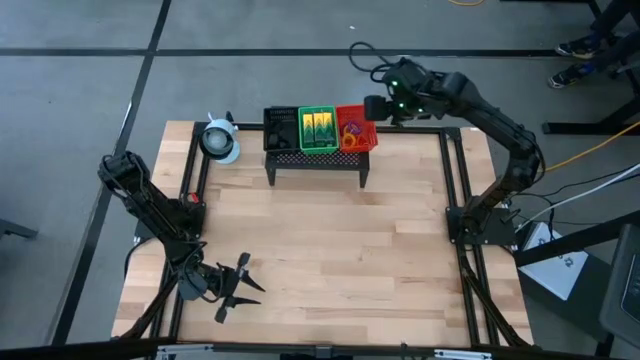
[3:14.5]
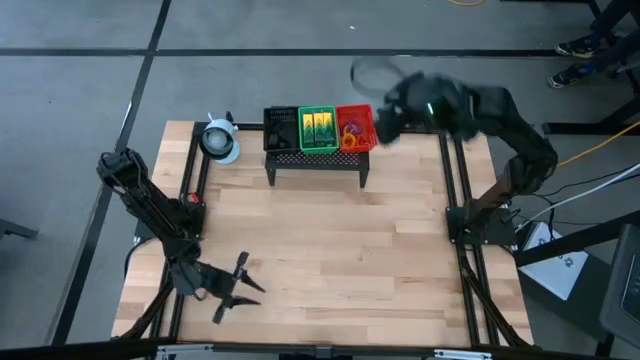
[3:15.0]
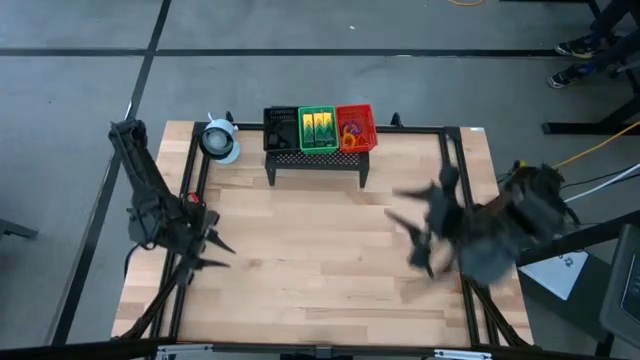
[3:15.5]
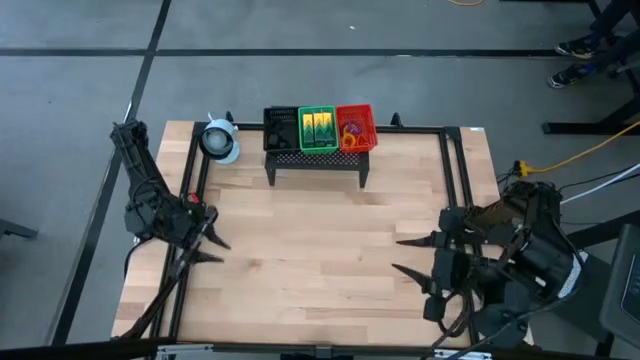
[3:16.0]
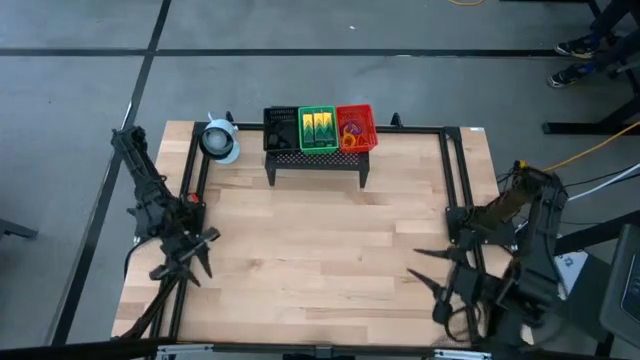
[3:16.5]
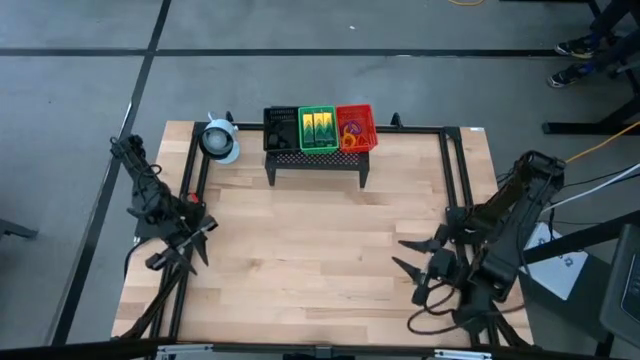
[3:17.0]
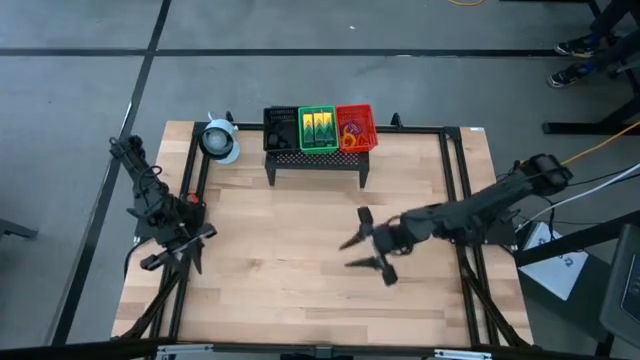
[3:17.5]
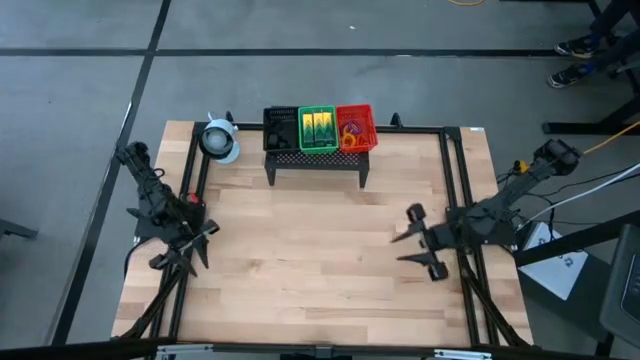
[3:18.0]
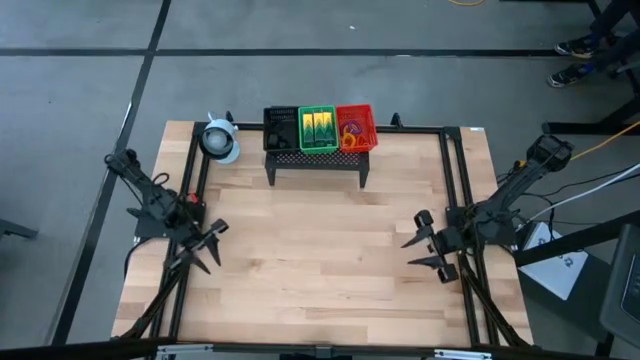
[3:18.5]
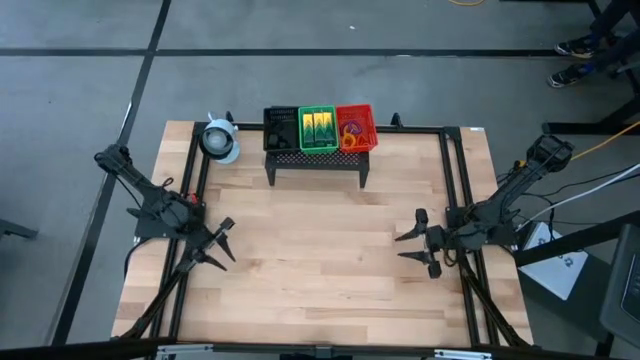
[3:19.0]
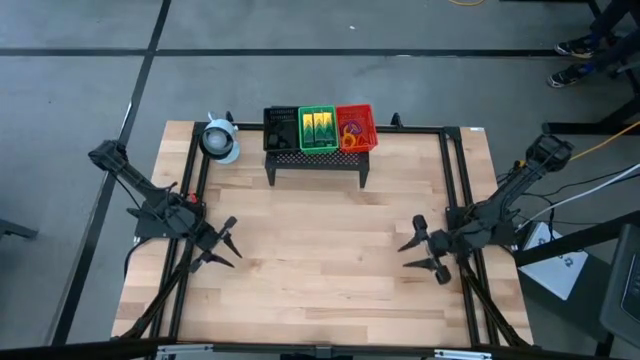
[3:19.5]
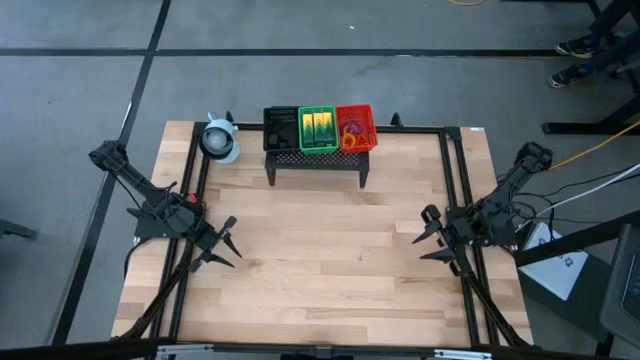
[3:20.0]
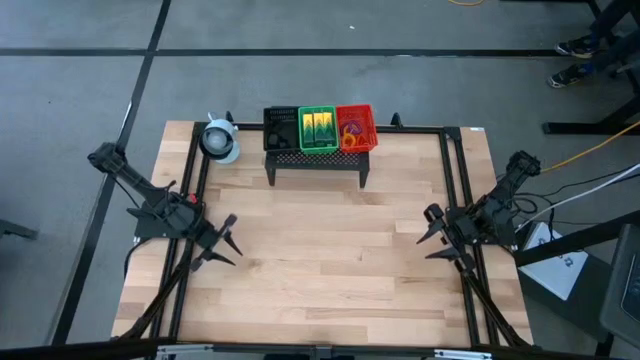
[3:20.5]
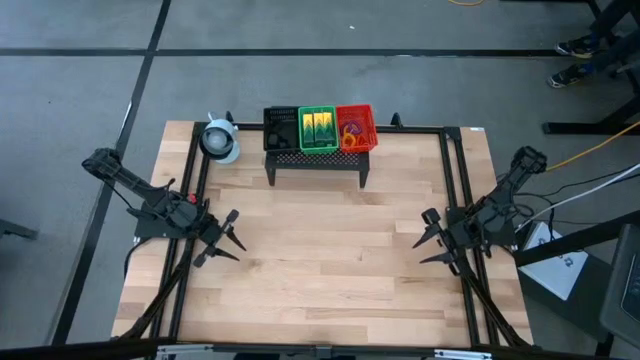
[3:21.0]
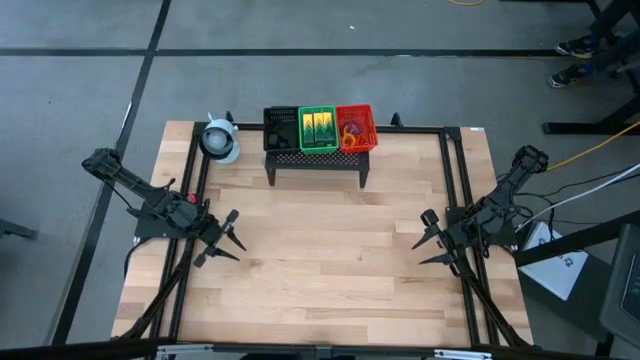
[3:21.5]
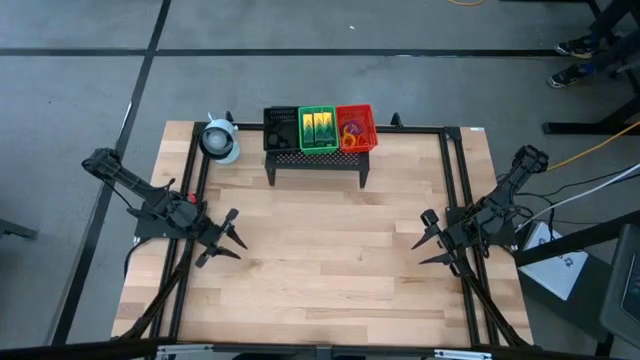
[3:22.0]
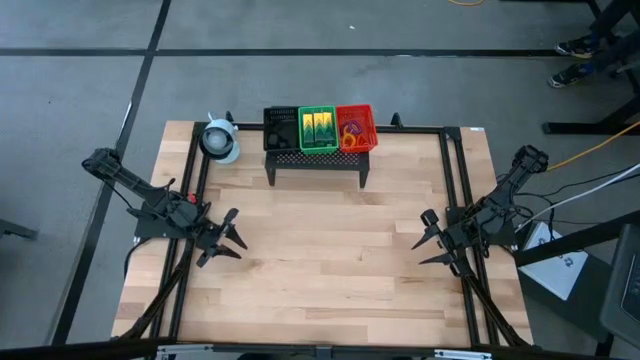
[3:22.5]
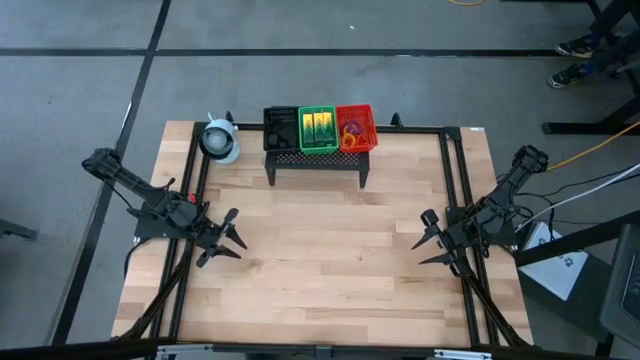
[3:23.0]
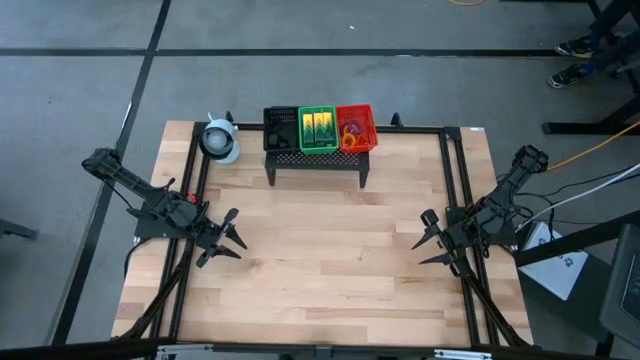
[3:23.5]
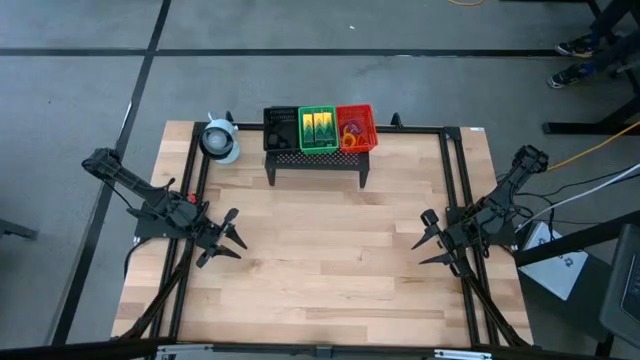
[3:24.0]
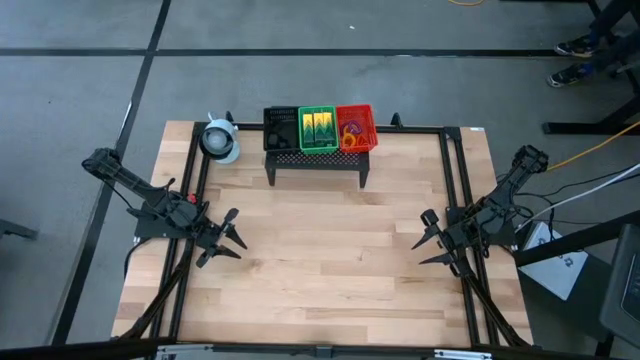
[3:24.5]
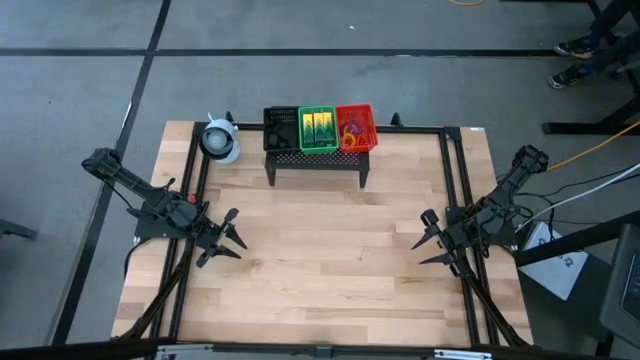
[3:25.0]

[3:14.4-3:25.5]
Task: Pick & Place Office Desk Supplies
Return to Home Position

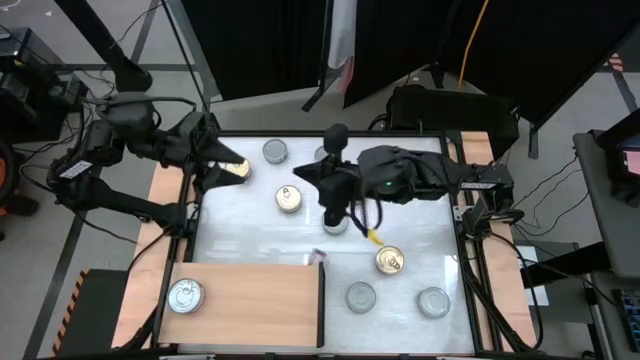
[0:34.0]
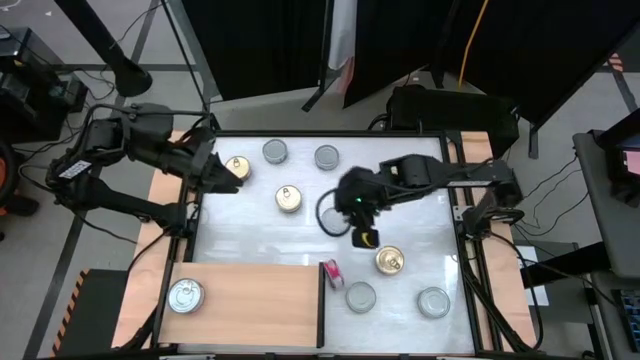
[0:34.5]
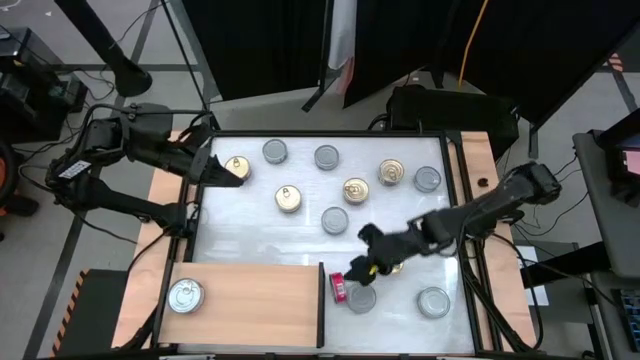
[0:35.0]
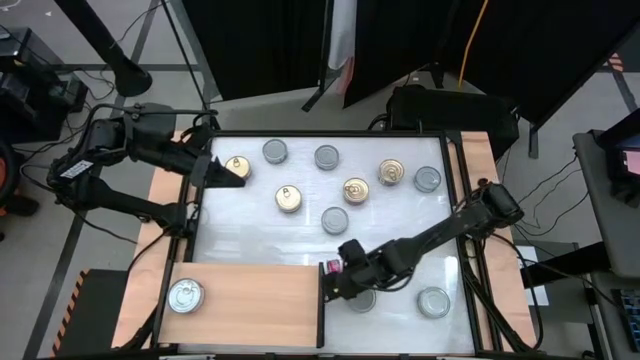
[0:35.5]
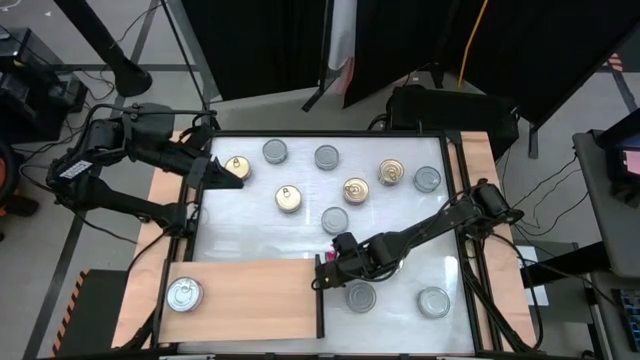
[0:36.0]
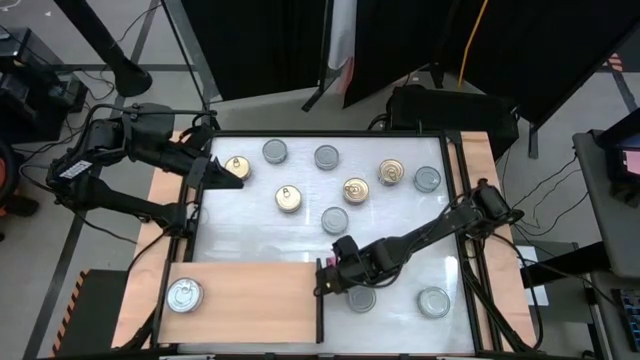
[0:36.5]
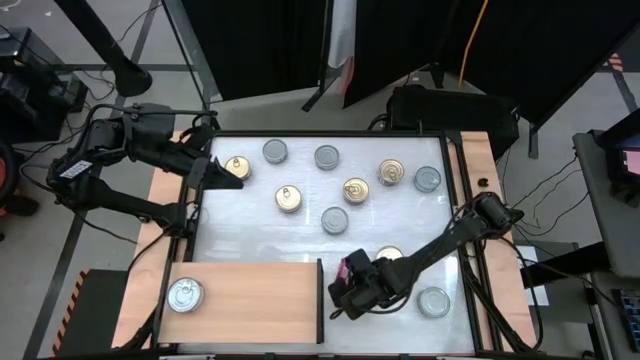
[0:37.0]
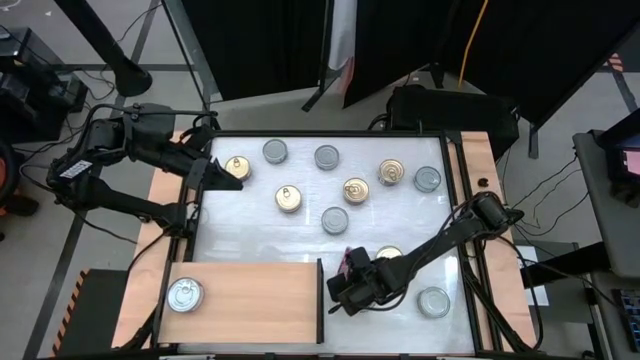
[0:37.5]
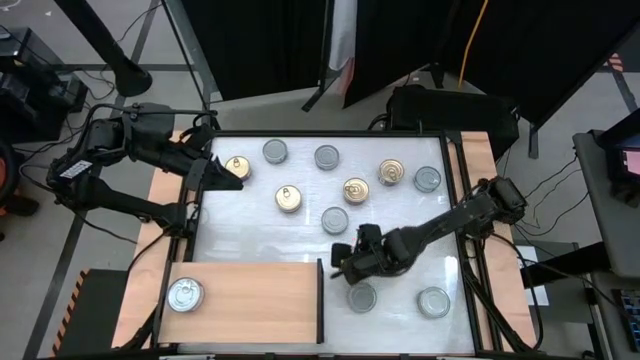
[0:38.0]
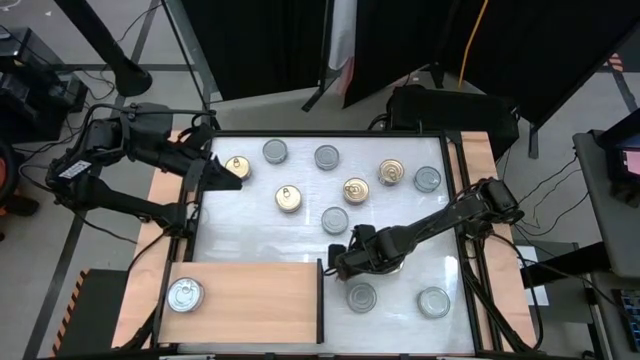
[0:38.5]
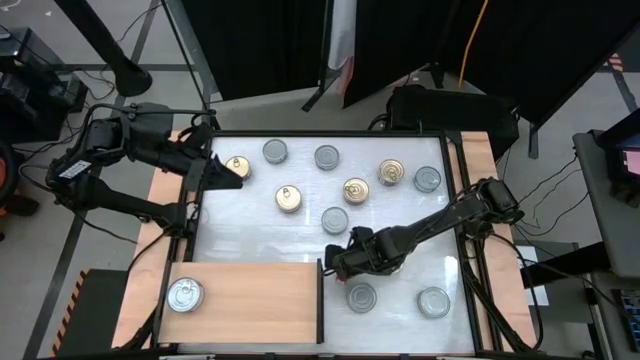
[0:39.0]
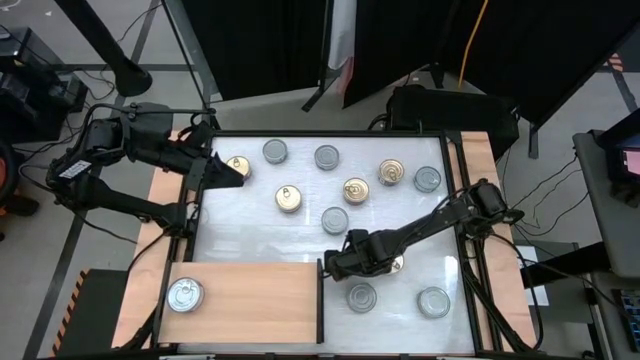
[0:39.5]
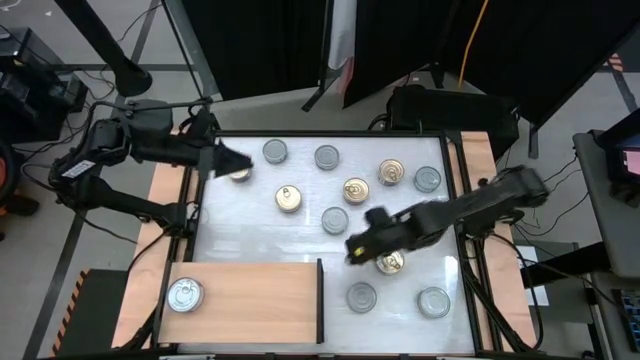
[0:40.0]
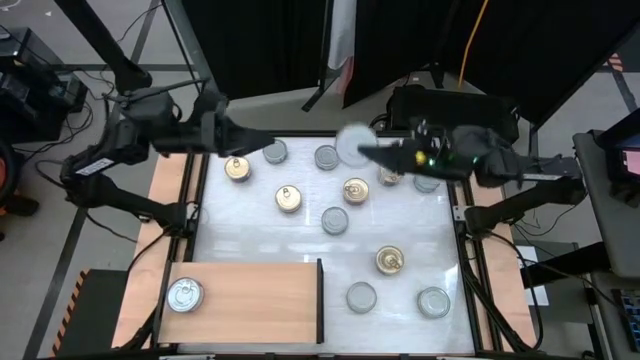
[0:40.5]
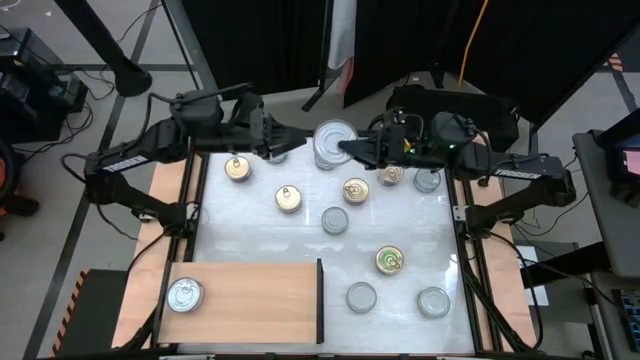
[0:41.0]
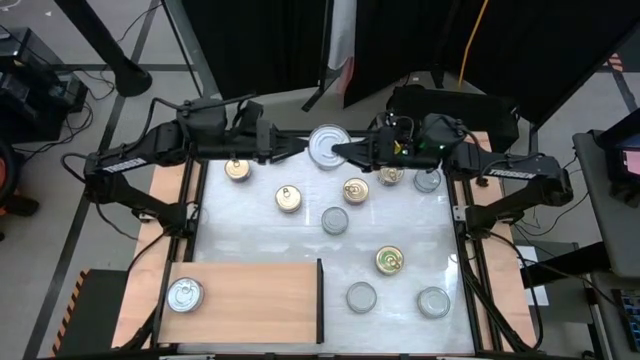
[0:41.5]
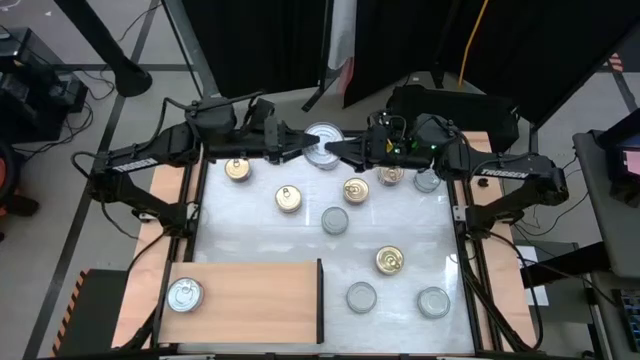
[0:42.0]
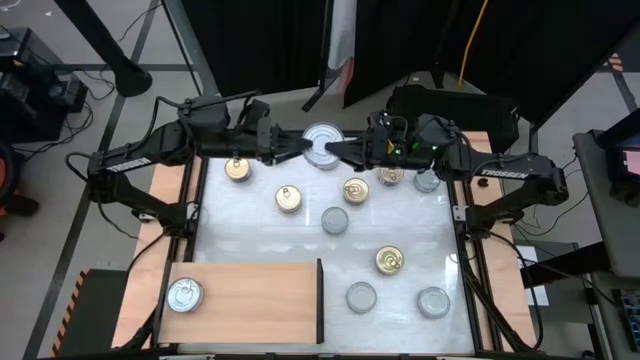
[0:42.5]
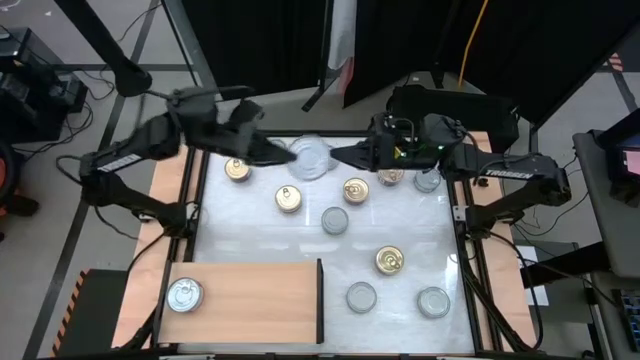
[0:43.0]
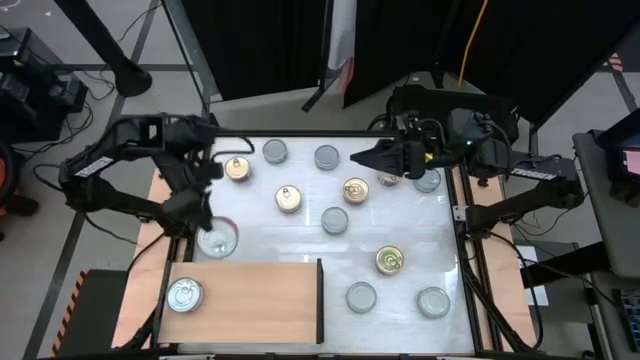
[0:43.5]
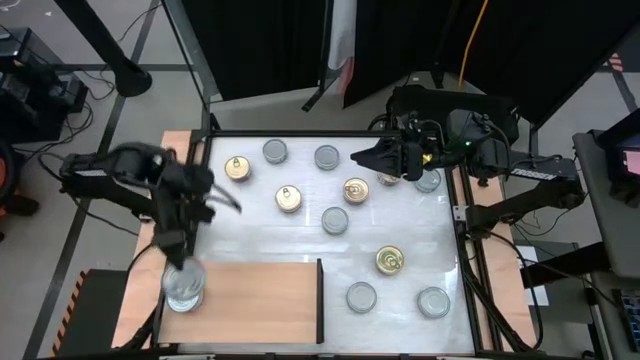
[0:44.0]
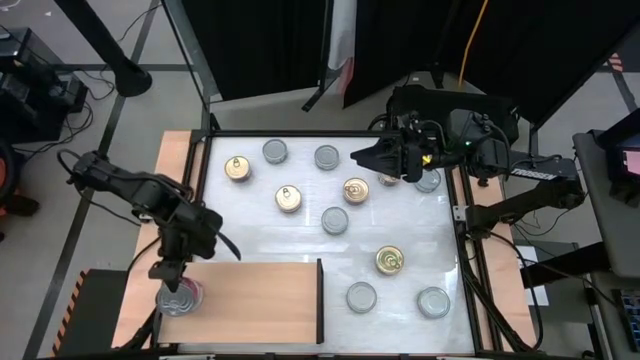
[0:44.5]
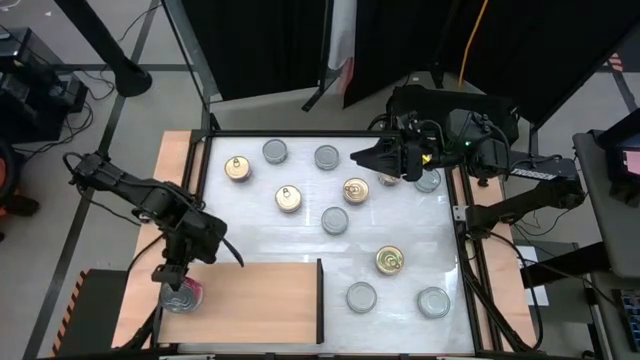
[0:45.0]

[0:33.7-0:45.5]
Task: Stack canned seafood by type on shelf
Stack the red tuna can on top of the other red tuna can on the shelf
